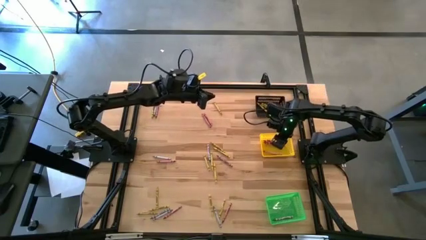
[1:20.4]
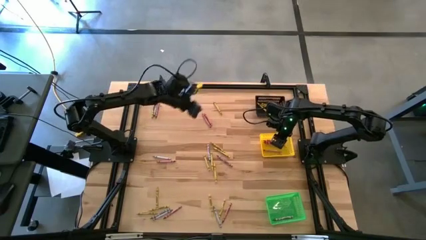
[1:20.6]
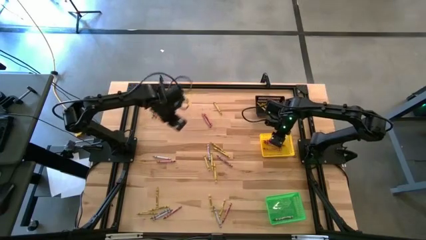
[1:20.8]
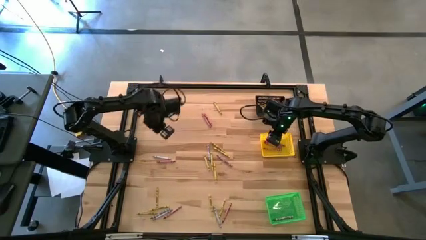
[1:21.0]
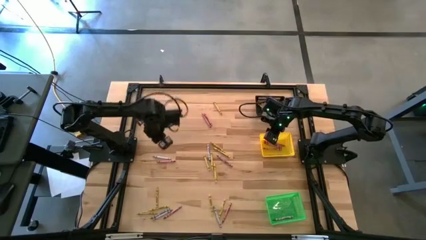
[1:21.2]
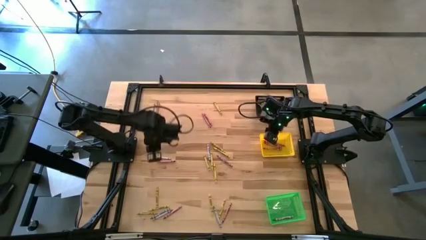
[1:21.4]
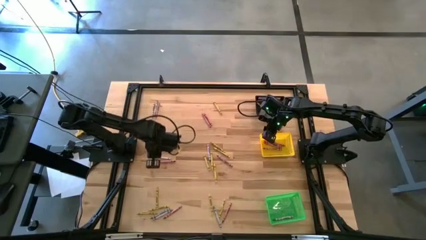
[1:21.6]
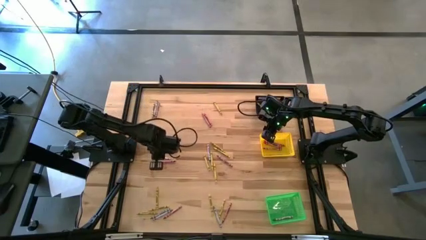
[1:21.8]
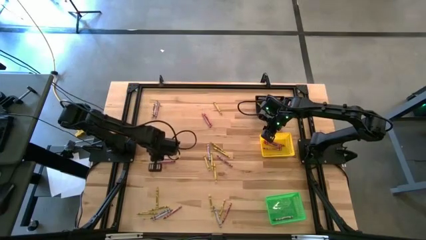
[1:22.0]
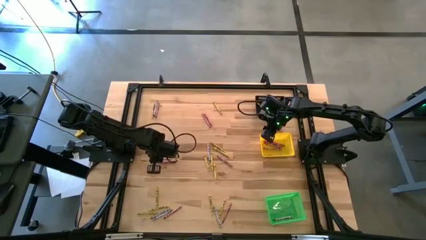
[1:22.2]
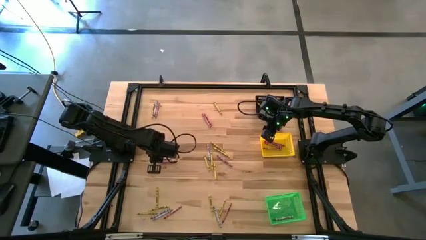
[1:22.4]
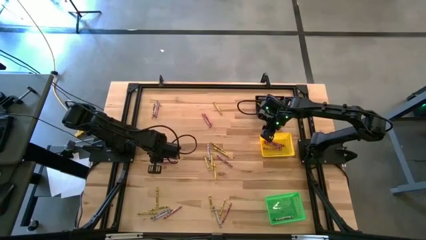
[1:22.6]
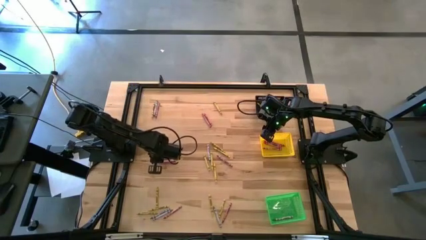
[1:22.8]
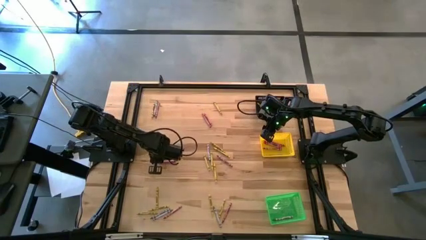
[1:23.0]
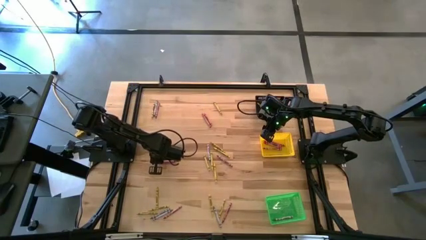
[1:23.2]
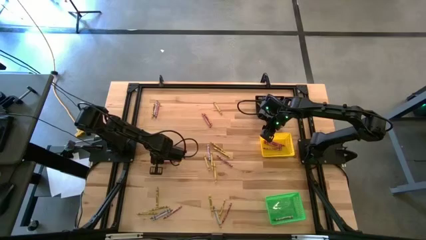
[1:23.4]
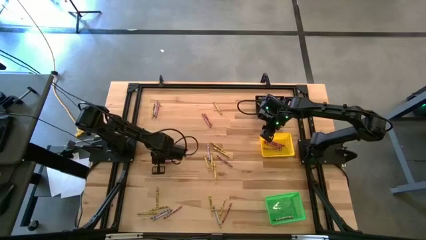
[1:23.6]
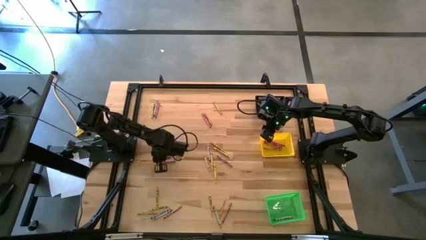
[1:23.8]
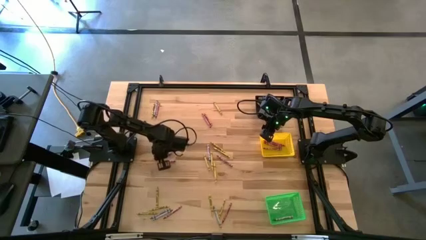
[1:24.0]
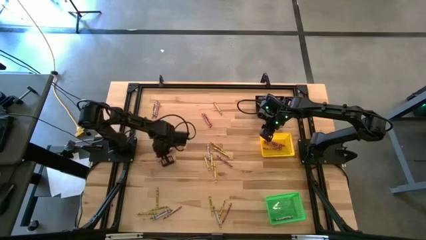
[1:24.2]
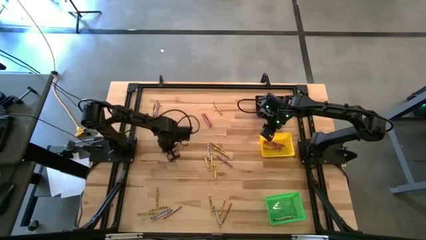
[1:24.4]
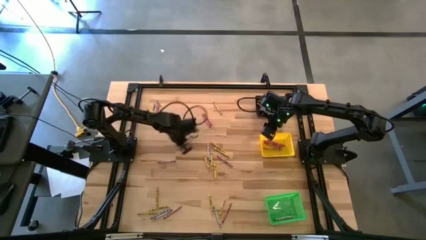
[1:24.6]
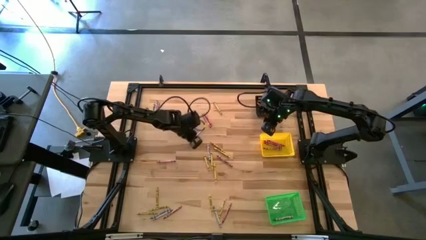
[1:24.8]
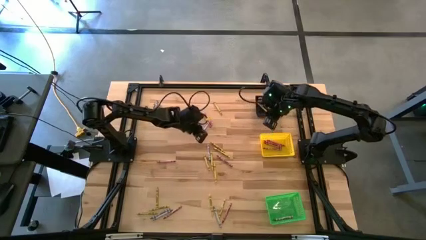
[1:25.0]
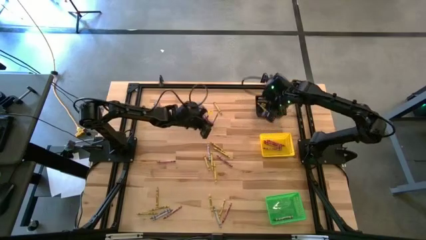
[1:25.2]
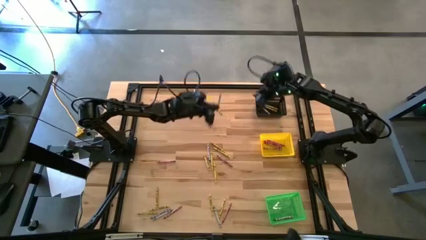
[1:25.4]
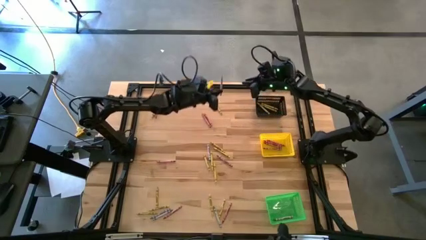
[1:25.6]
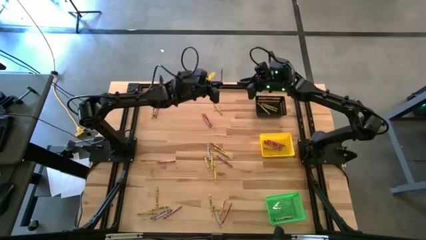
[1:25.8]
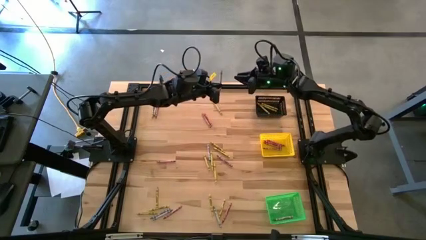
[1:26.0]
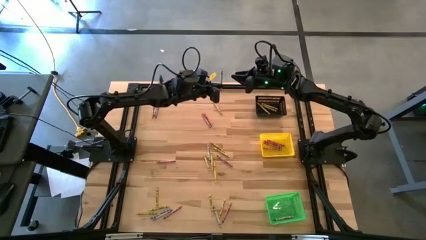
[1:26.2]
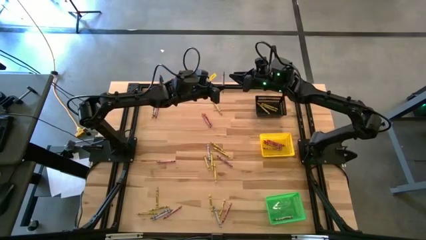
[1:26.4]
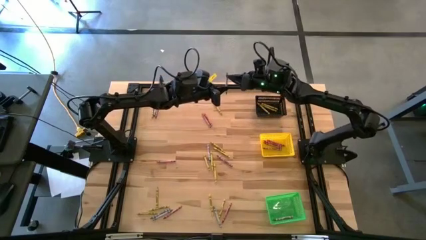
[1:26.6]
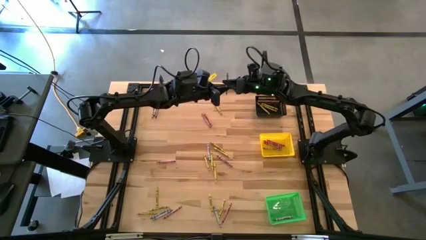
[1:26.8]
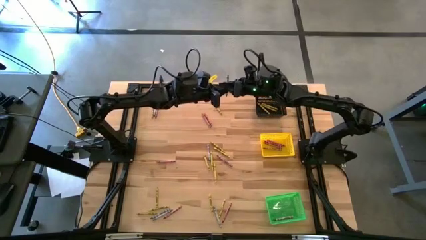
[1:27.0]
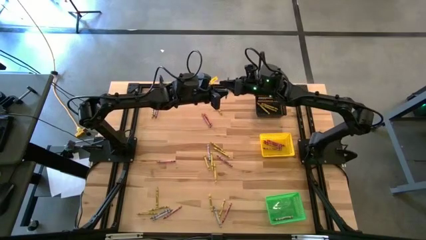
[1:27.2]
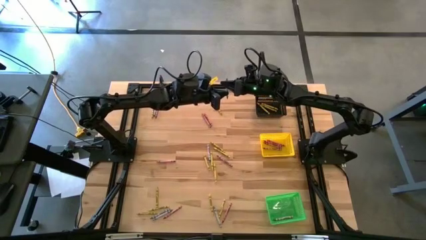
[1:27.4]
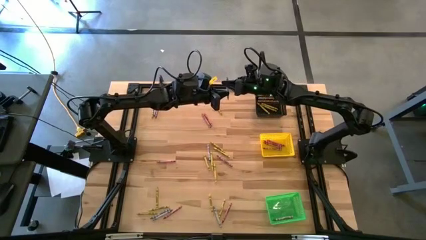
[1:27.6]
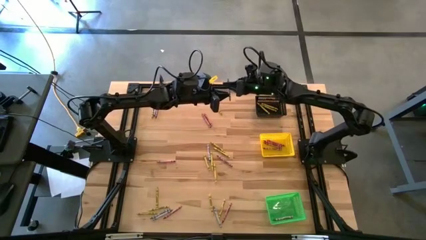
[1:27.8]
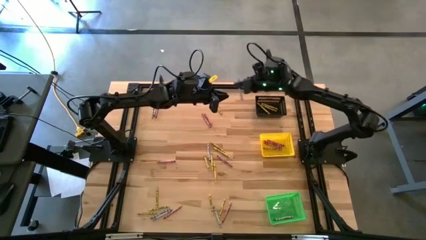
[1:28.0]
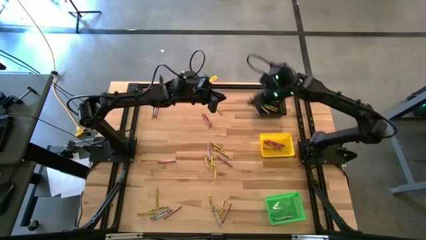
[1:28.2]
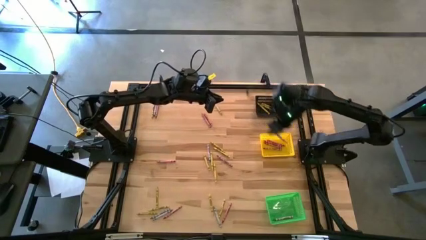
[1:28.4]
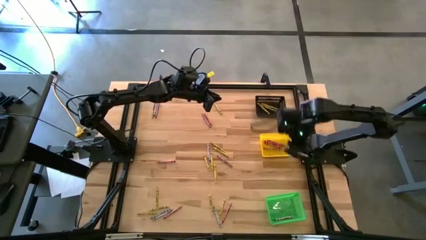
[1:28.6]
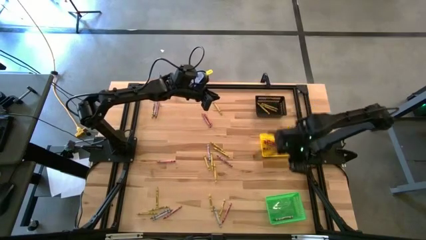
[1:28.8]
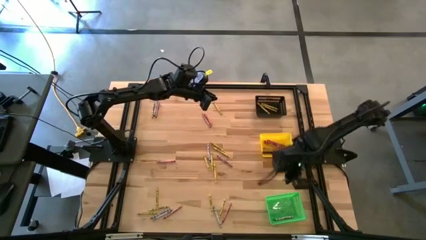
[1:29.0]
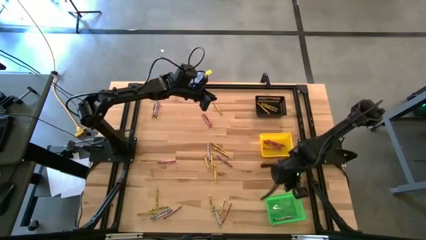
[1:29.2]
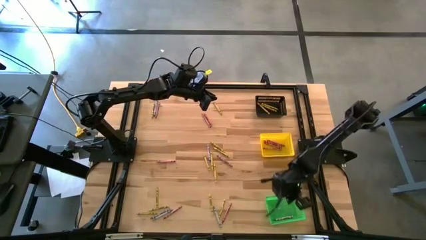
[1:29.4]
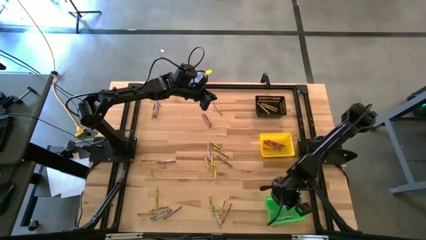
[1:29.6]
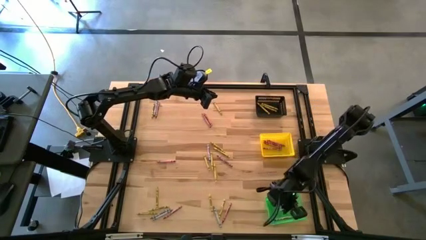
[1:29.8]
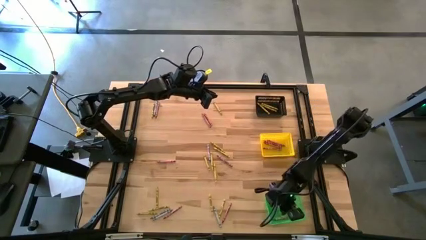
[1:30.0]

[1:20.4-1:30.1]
Task: Sort crayons
Put the gray crayon into the green bin

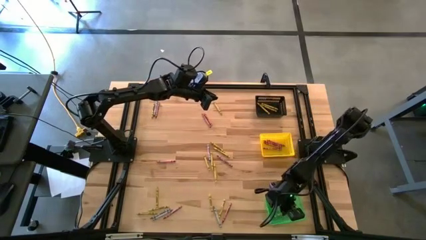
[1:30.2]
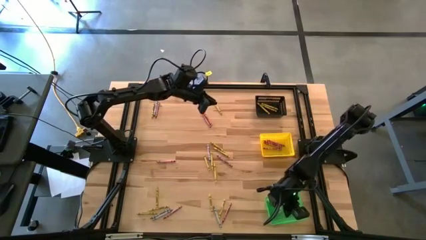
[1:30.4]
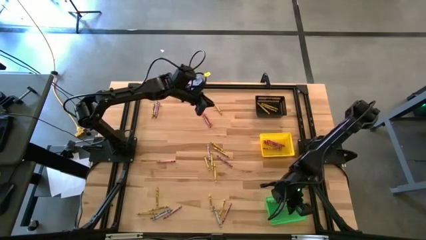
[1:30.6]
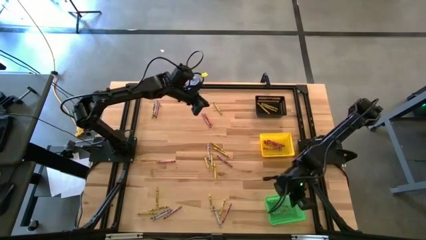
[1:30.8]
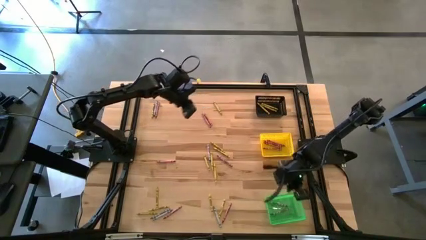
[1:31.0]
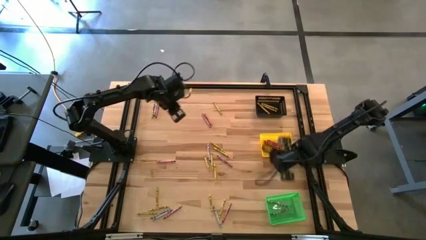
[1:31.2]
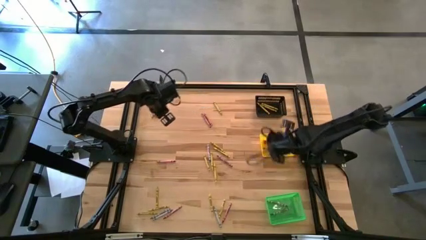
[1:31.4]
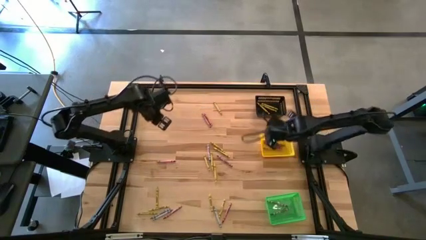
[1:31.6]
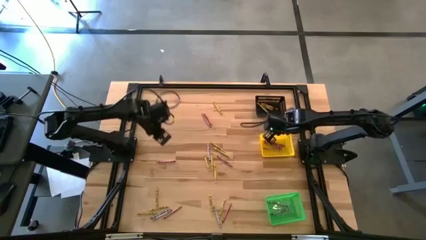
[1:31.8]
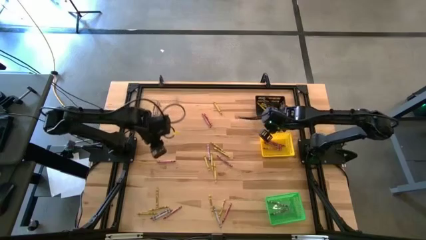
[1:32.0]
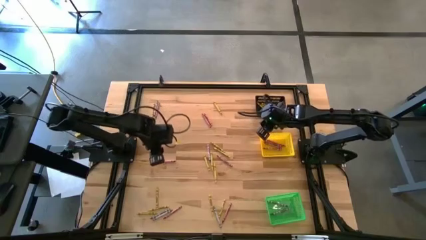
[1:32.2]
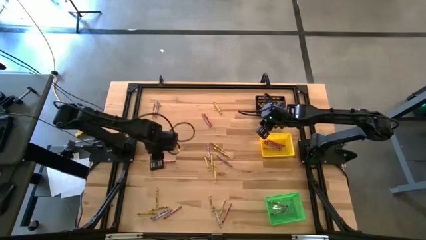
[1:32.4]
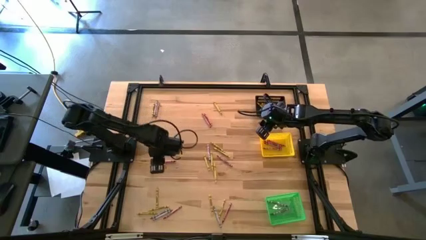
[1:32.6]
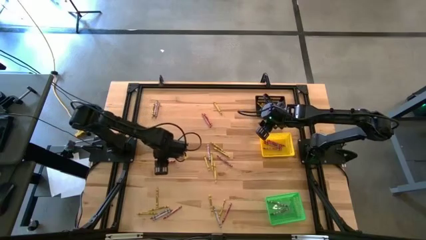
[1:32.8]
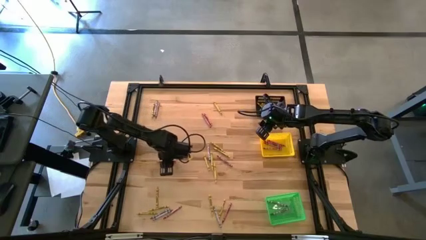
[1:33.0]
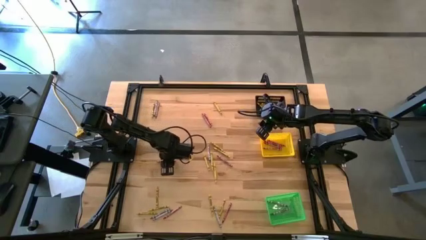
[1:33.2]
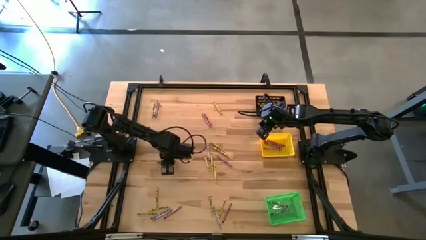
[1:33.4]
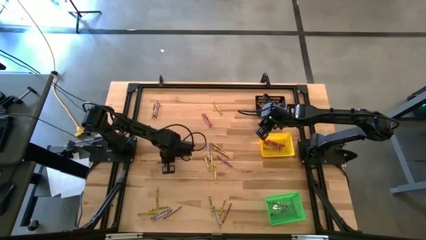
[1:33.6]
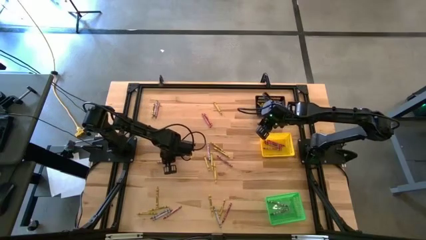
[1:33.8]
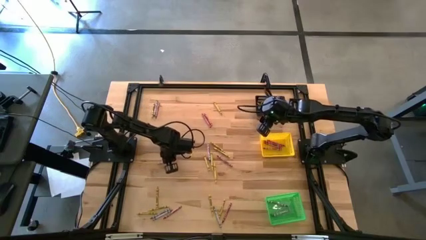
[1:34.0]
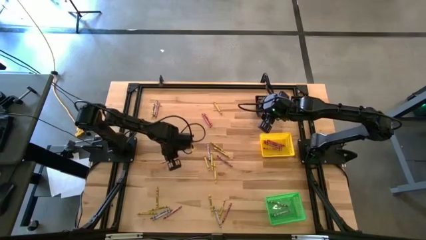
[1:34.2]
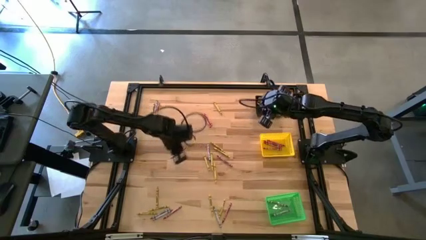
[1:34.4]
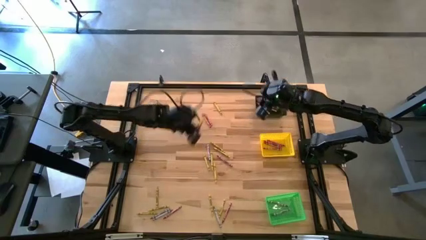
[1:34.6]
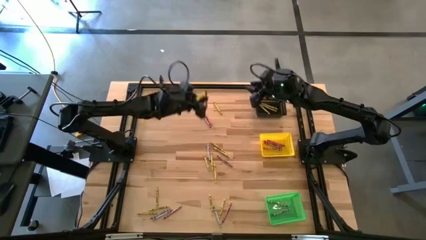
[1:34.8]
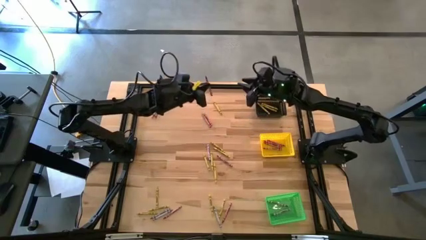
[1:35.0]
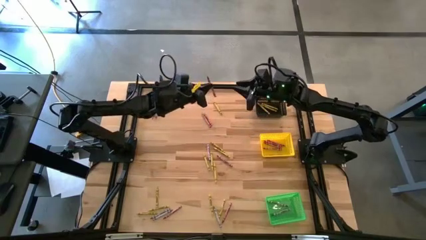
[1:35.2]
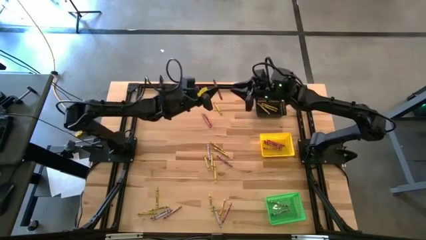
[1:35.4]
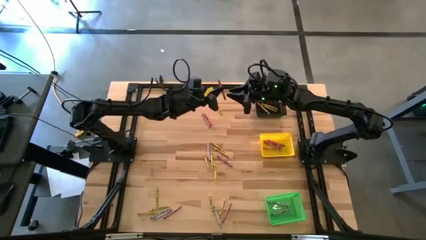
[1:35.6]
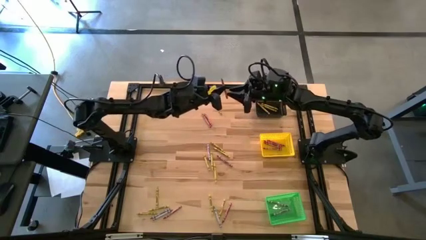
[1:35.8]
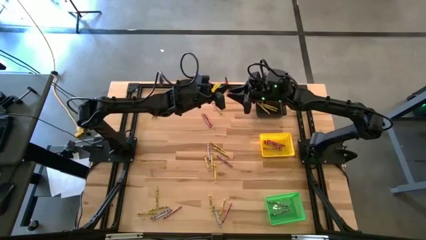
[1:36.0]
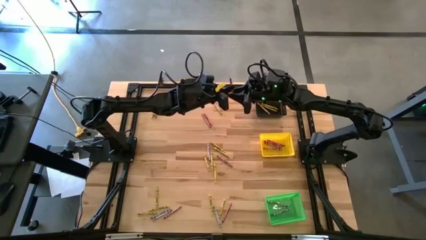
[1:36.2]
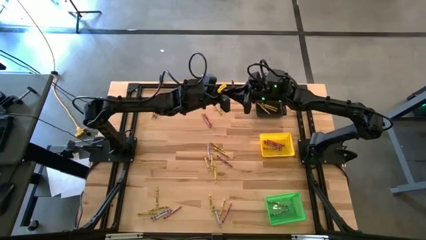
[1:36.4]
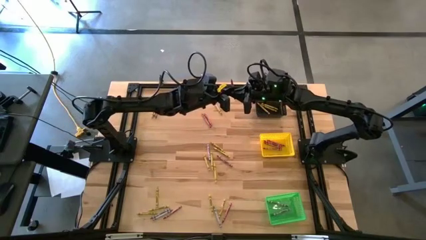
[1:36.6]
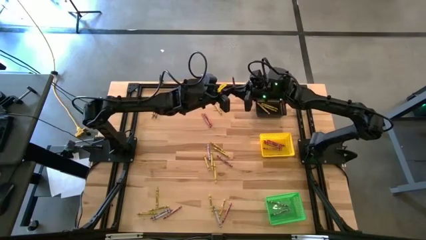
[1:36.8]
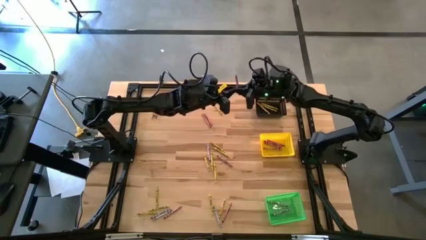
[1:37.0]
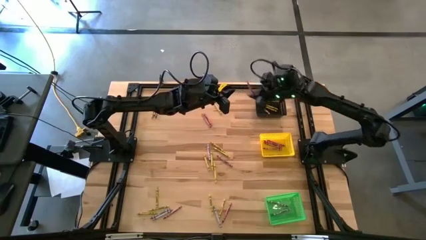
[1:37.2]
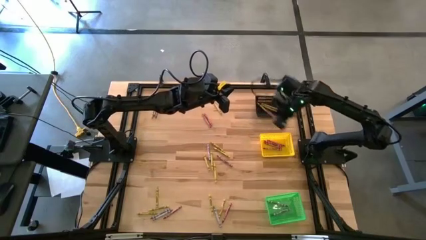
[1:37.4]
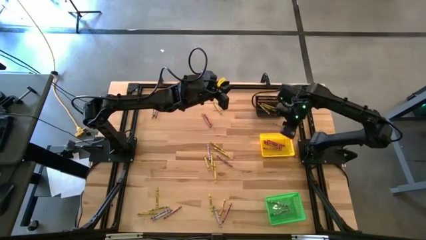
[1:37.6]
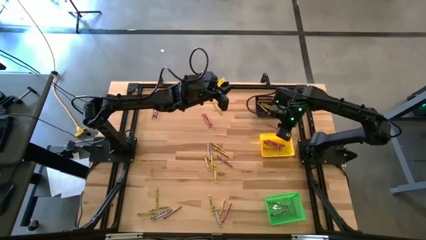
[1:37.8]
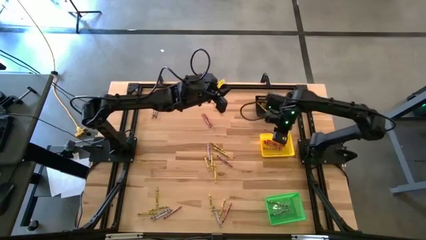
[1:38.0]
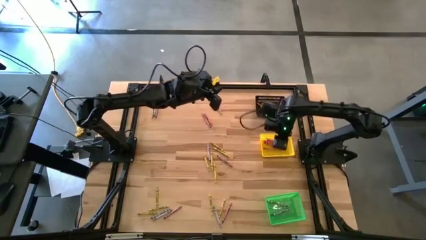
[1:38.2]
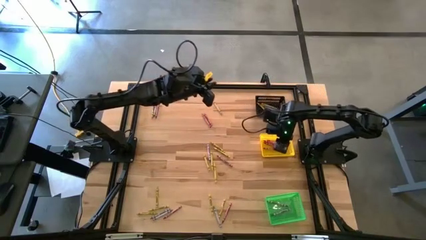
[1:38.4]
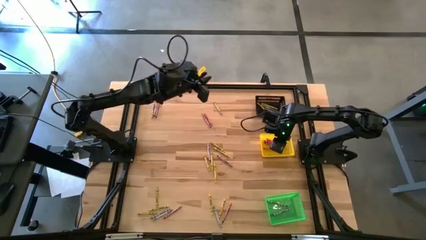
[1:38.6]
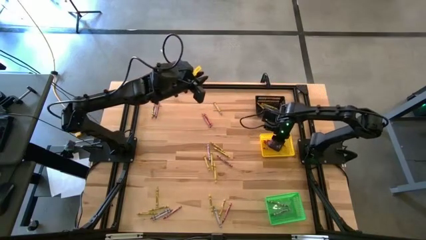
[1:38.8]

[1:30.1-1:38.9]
Put the red crayon into the yellow bin
